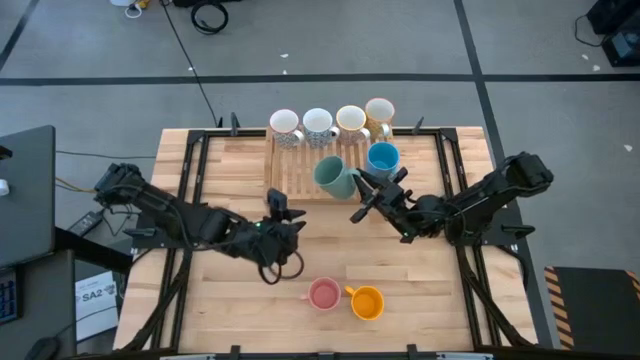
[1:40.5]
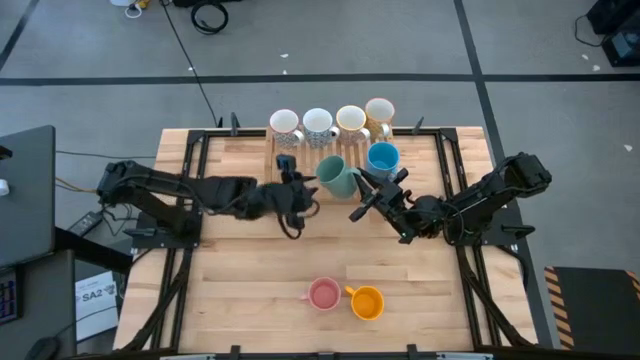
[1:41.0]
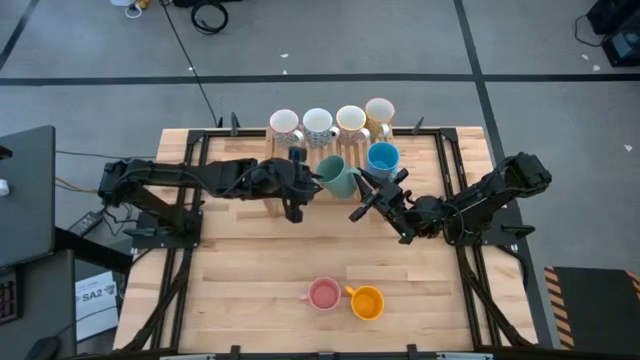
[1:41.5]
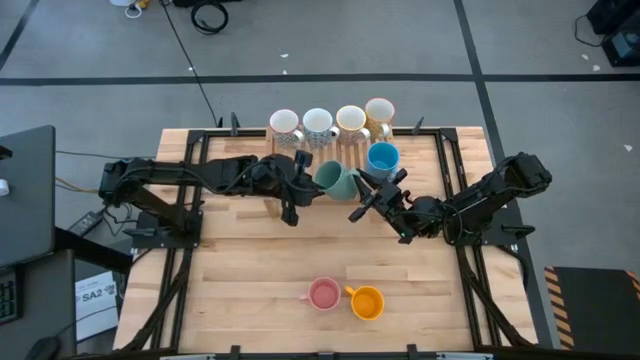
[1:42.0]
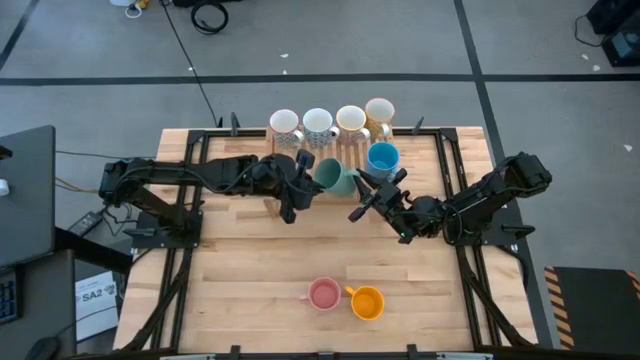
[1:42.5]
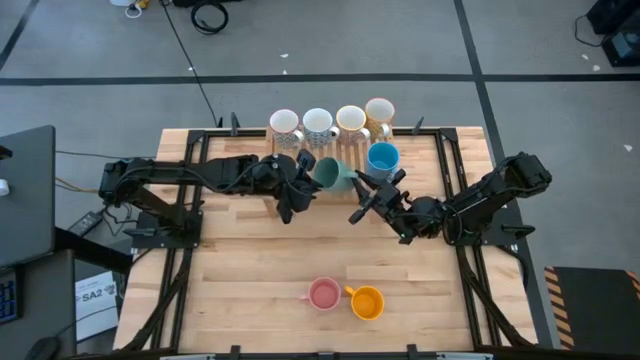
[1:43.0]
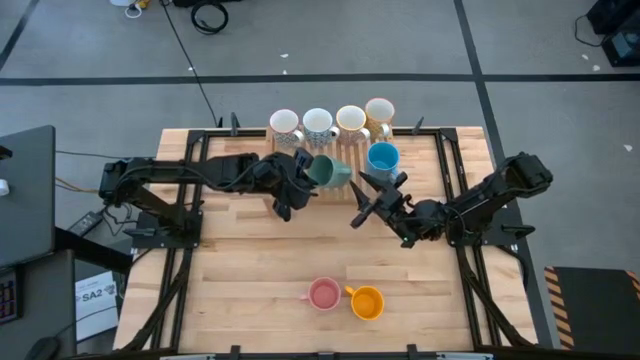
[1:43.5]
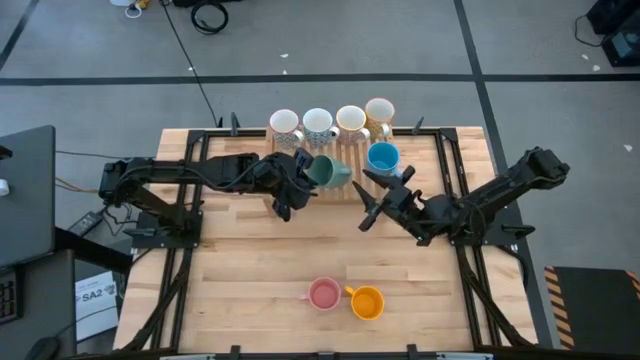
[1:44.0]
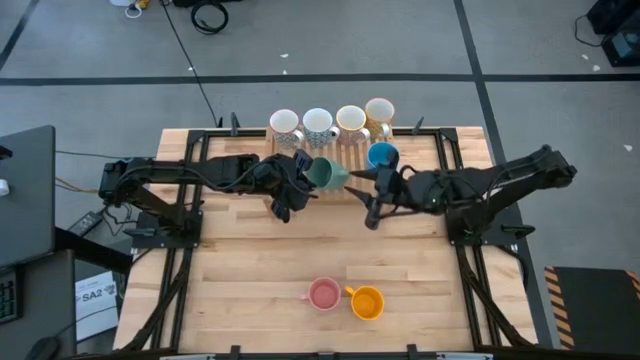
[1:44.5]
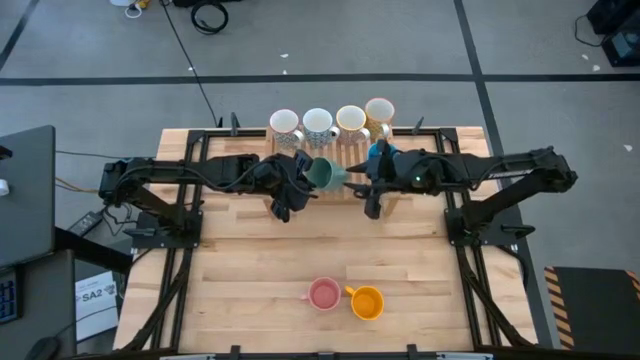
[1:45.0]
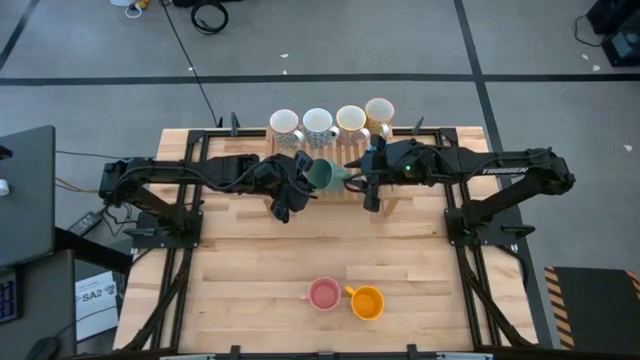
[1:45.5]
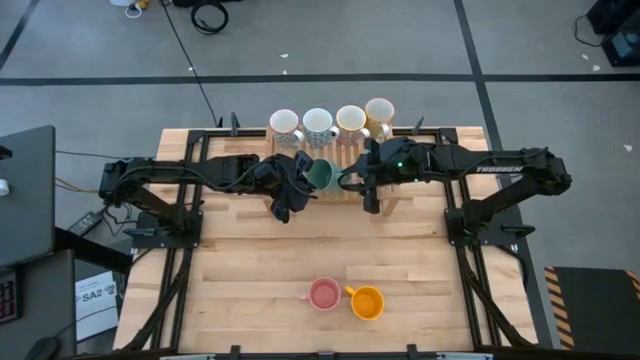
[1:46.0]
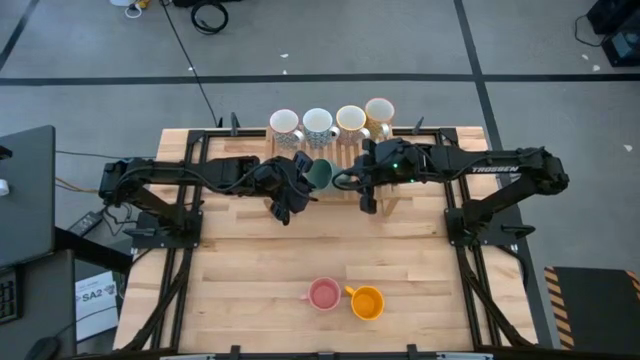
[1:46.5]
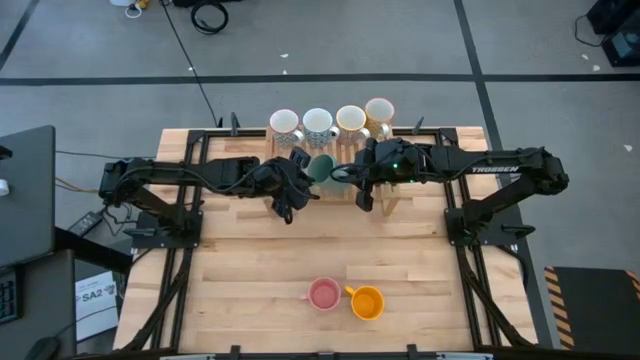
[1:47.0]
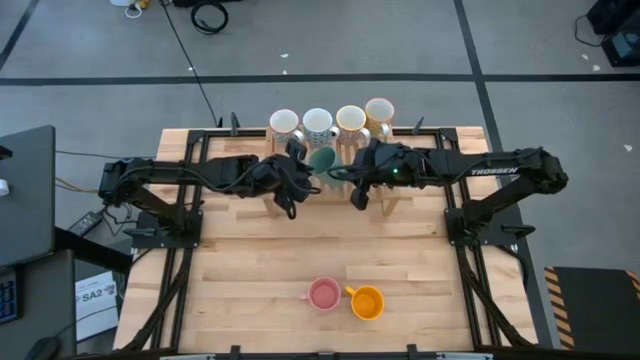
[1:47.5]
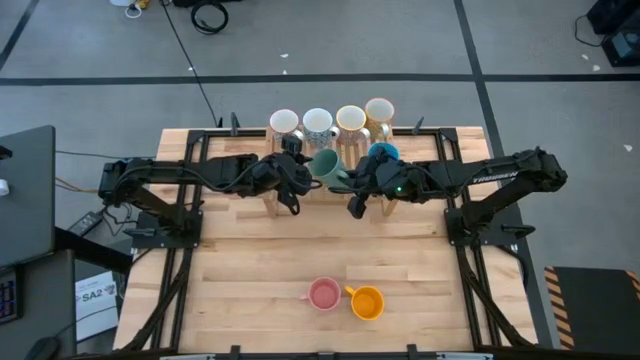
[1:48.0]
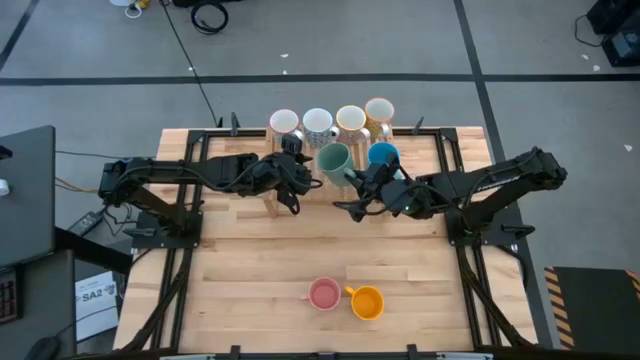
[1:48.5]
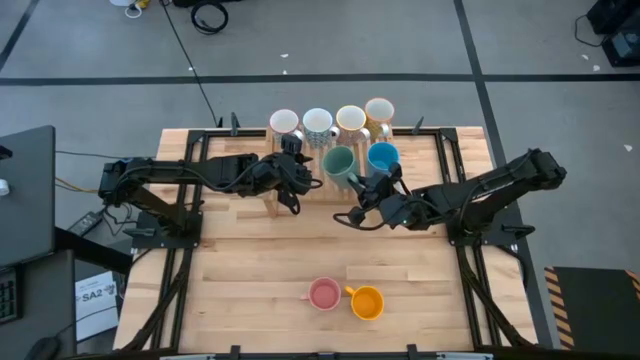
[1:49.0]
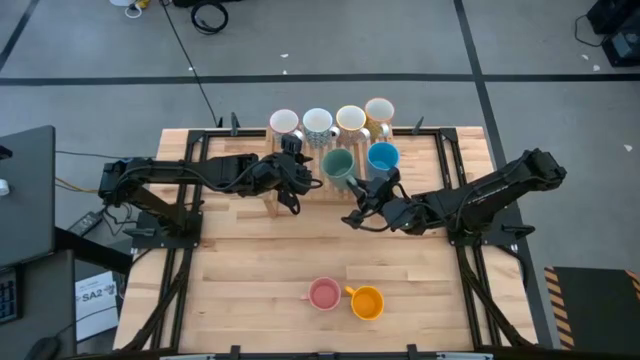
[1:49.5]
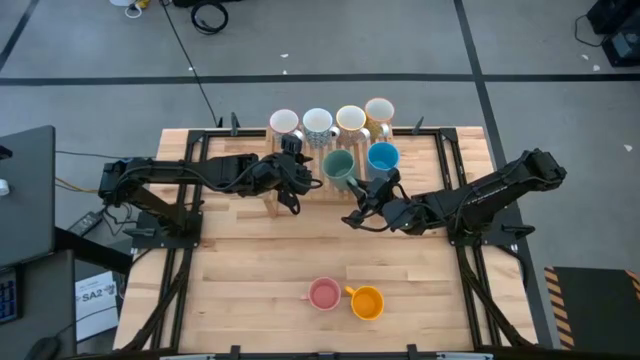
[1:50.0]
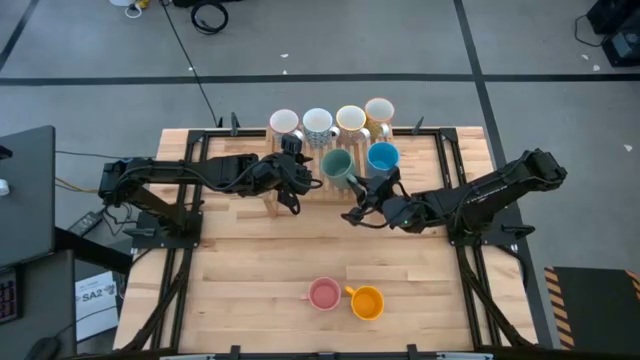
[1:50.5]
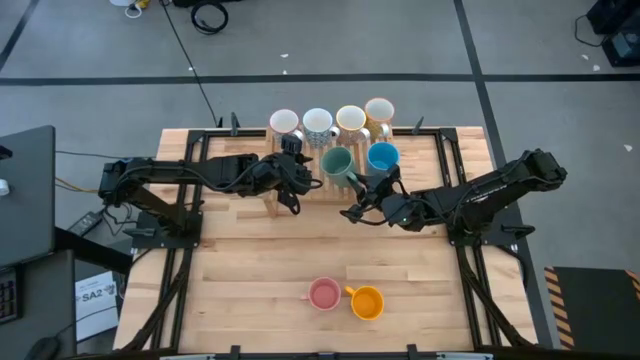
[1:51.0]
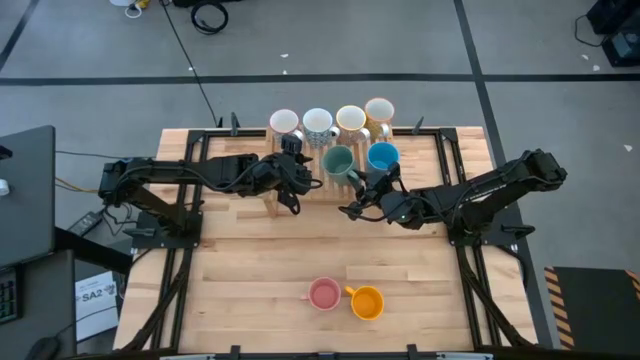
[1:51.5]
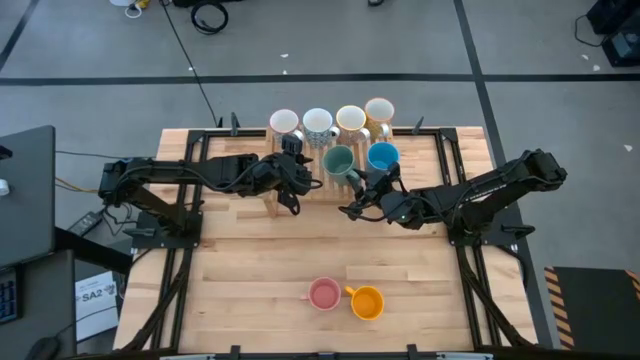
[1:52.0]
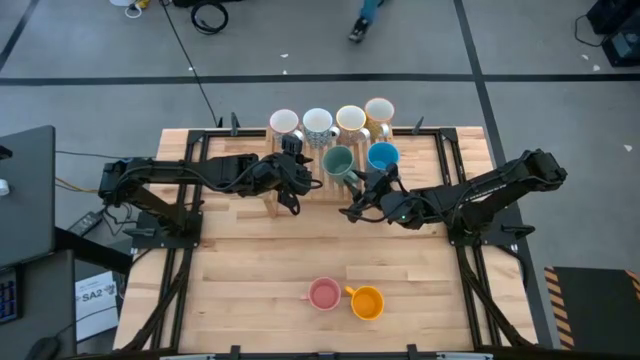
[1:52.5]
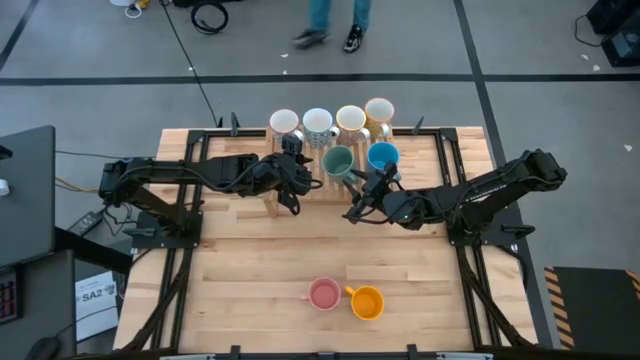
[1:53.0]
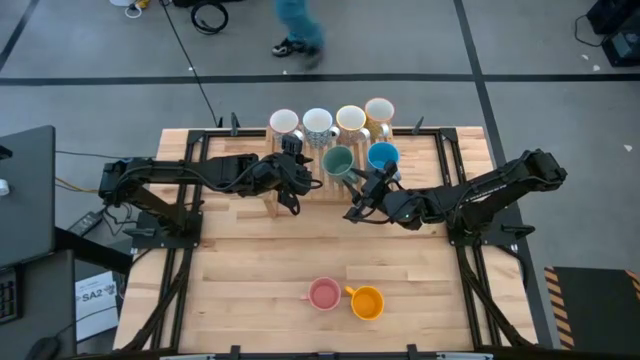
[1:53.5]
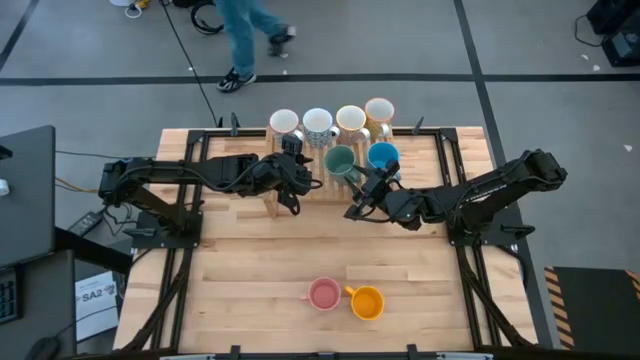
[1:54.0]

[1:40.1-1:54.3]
Task: Place coffee mugs
Put the green mug on the shelf aligned with the orange mug

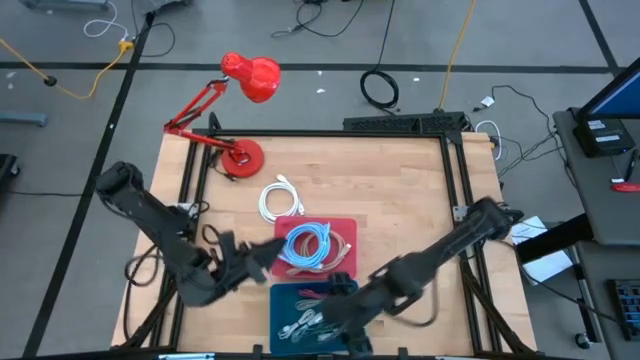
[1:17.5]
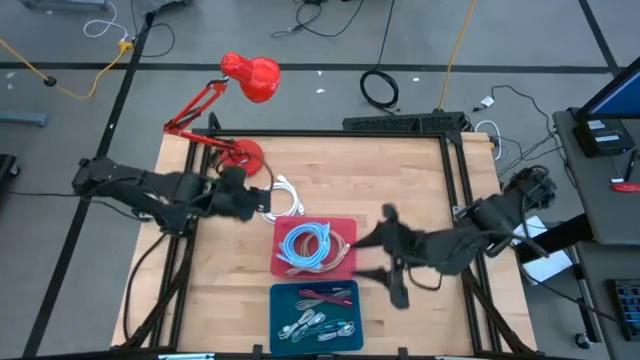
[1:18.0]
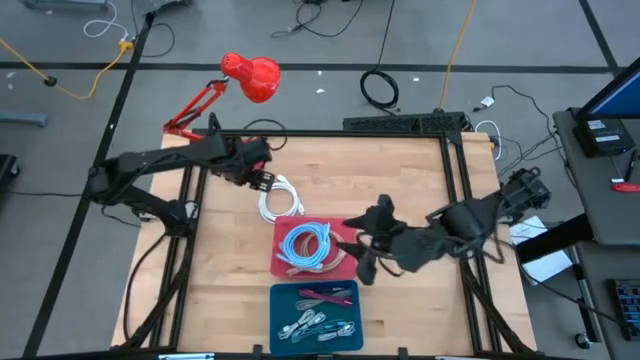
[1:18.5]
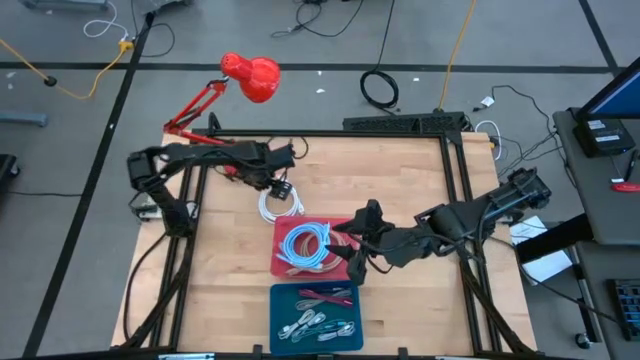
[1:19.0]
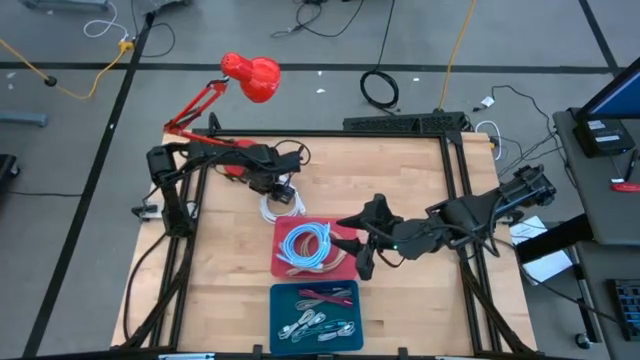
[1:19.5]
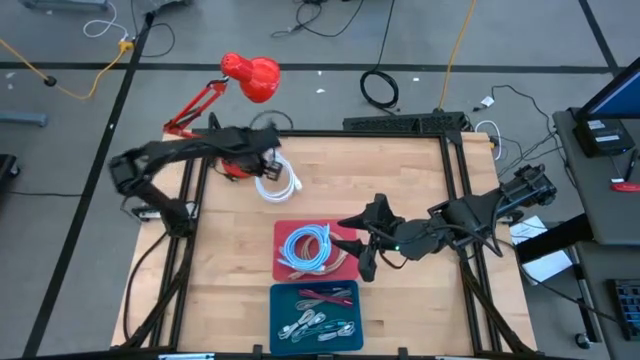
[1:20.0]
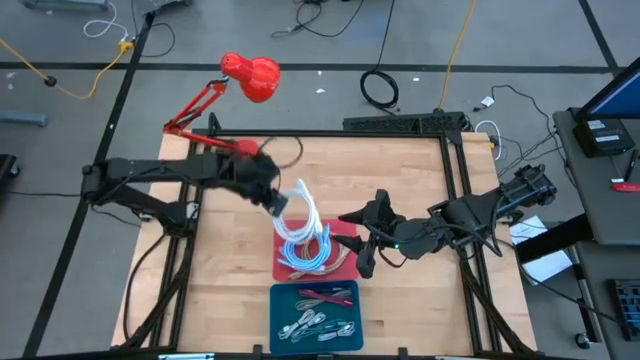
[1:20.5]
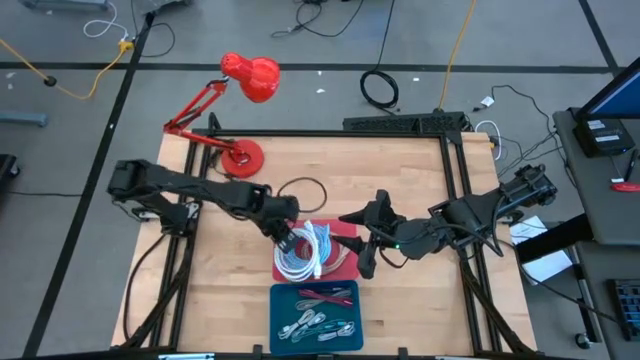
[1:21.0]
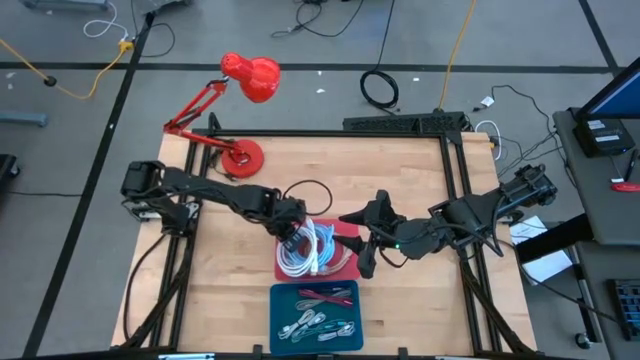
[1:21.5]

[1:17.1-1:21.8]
Task: Pick & Place USB Port
Put the white HDMI cable into the red bin

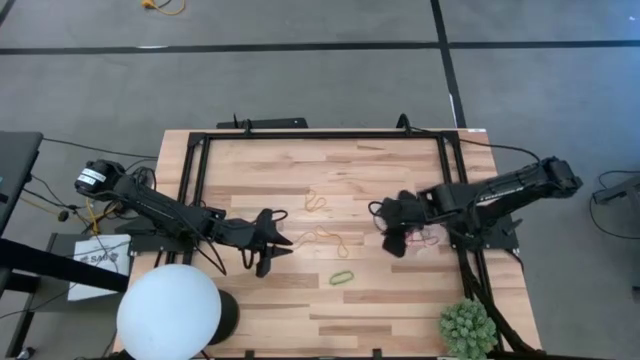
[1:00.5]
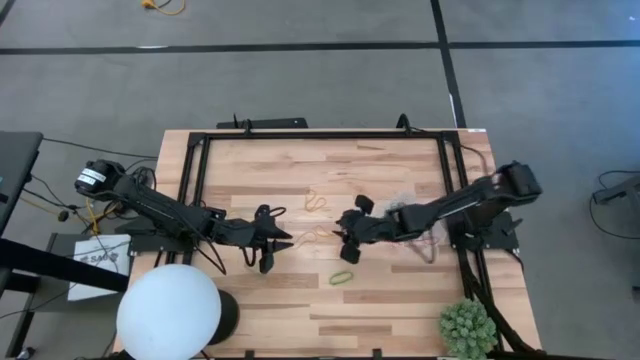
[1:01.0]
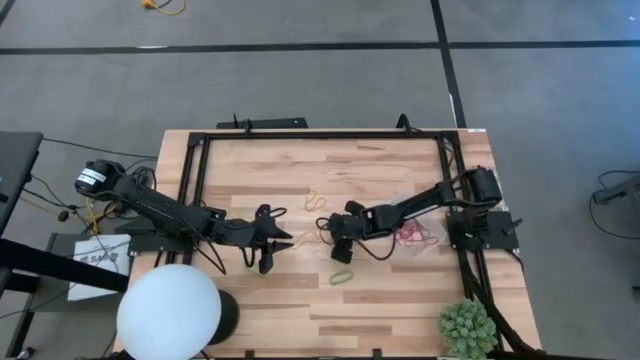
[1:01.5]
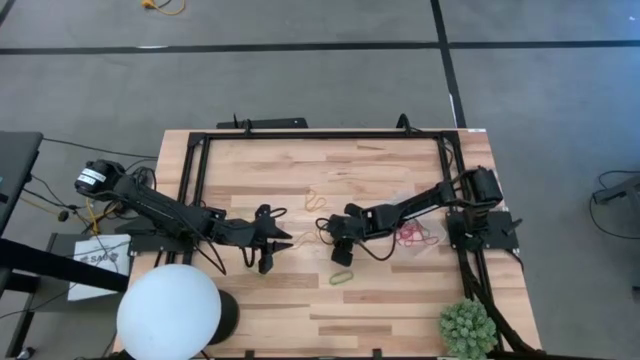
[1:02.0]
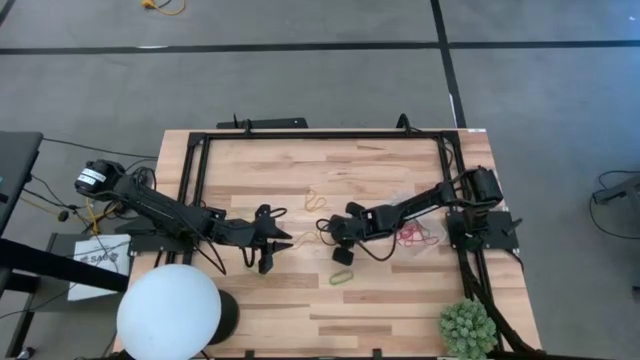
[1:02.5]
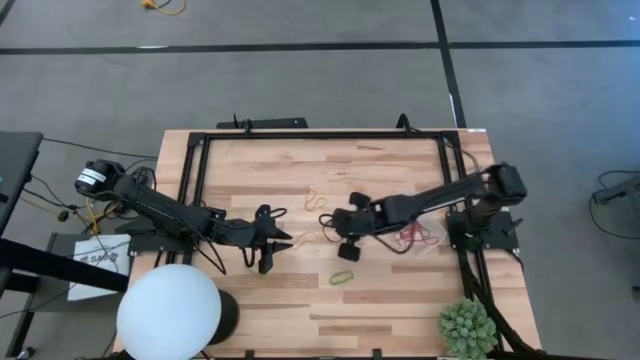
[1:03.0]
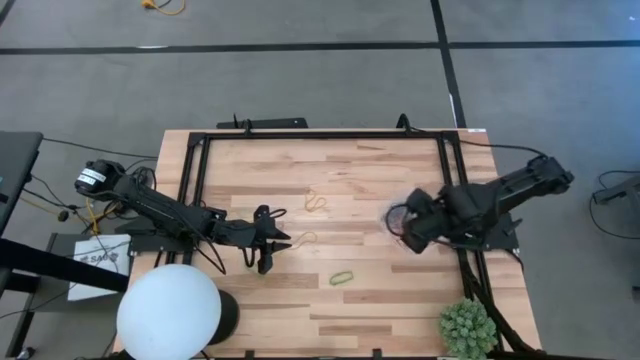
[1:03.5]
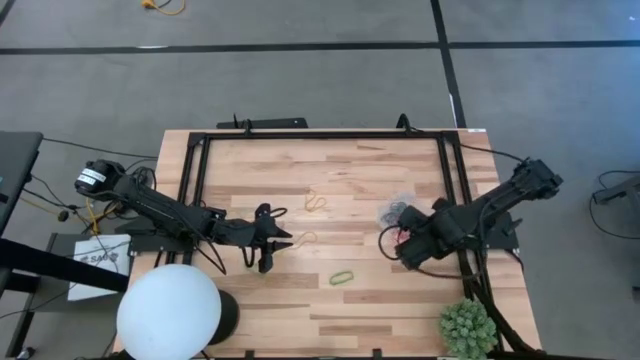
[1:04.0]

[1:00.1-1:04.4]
Task: Pick and place items into bin
Put the yellow rubber band into the transparent bin
